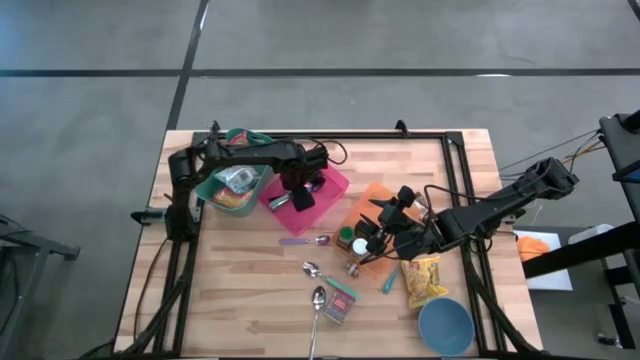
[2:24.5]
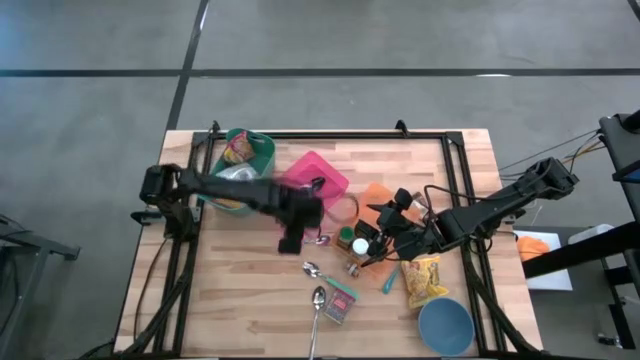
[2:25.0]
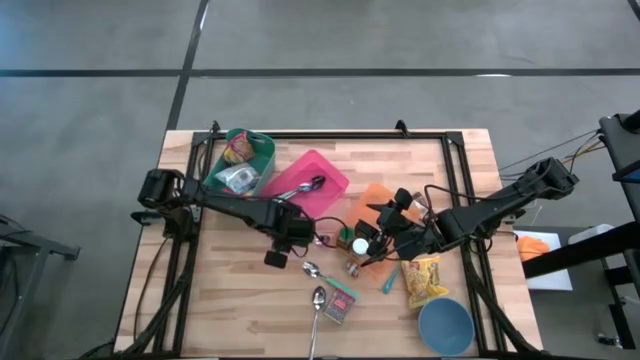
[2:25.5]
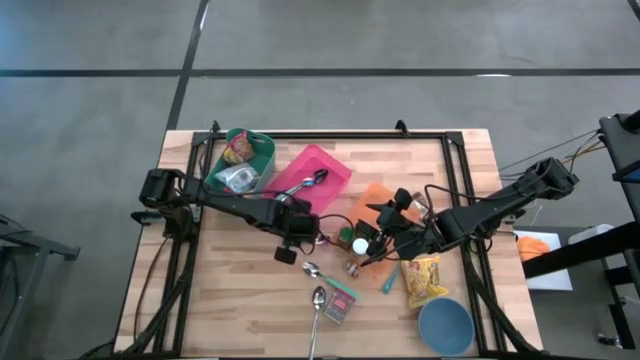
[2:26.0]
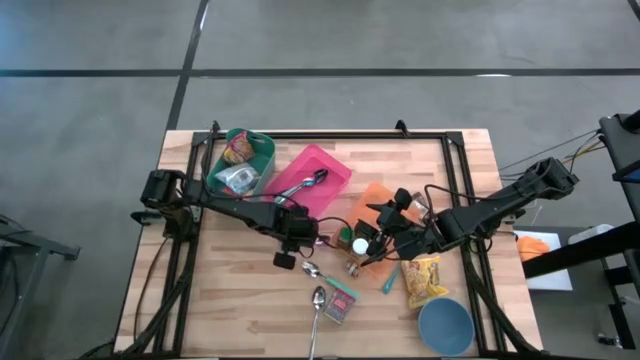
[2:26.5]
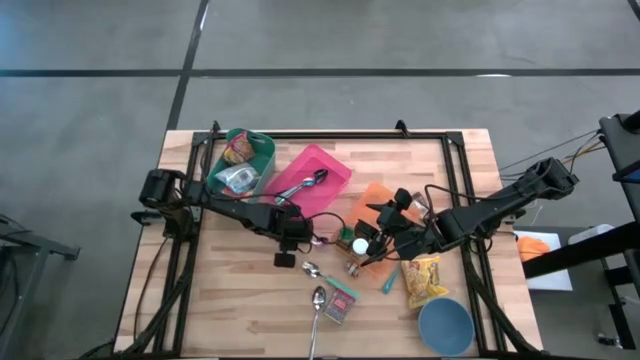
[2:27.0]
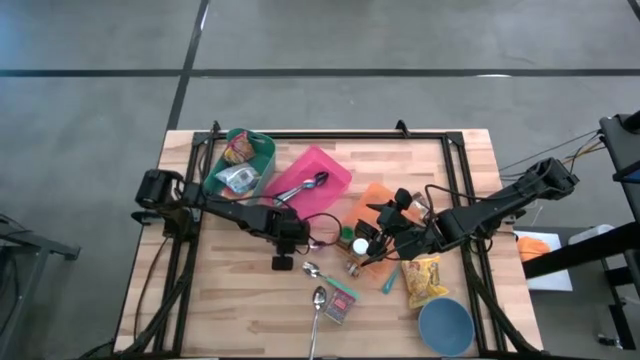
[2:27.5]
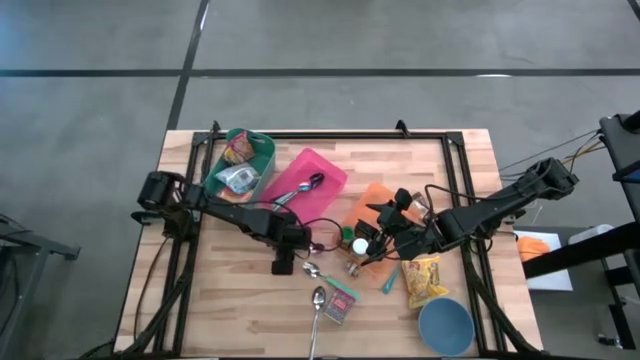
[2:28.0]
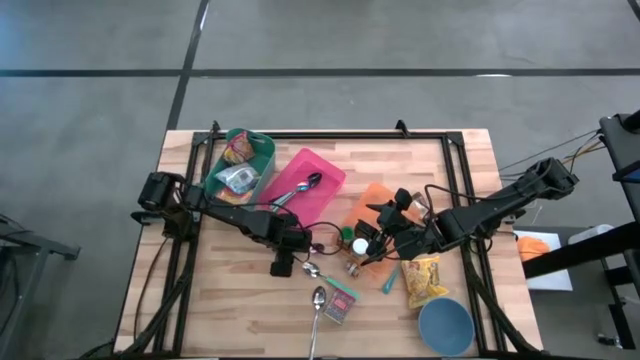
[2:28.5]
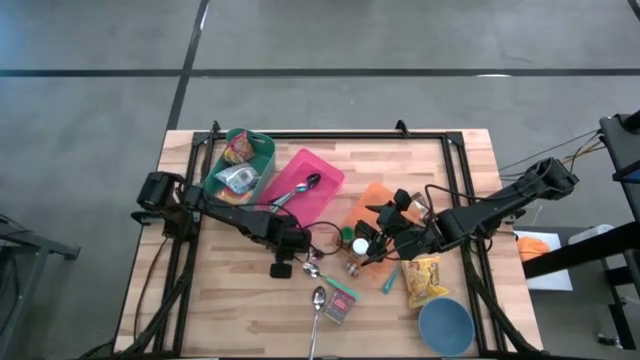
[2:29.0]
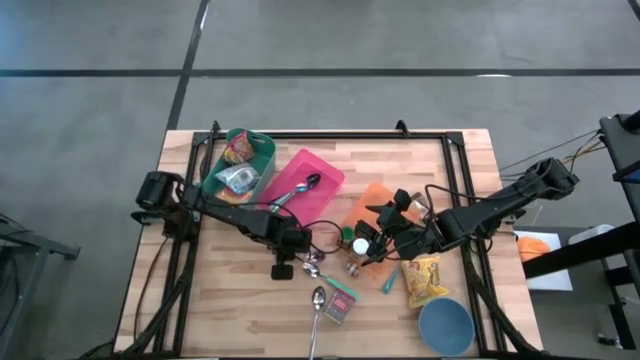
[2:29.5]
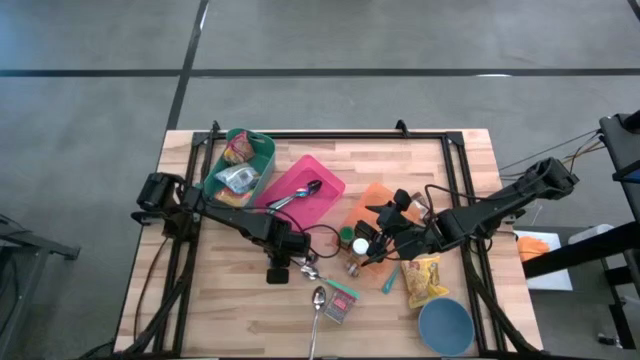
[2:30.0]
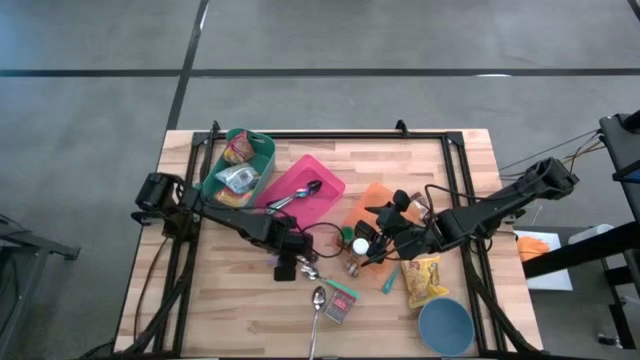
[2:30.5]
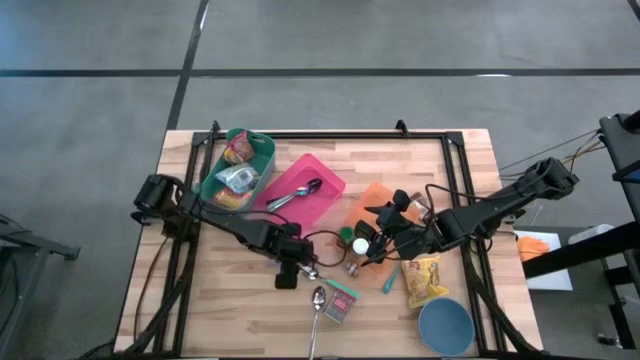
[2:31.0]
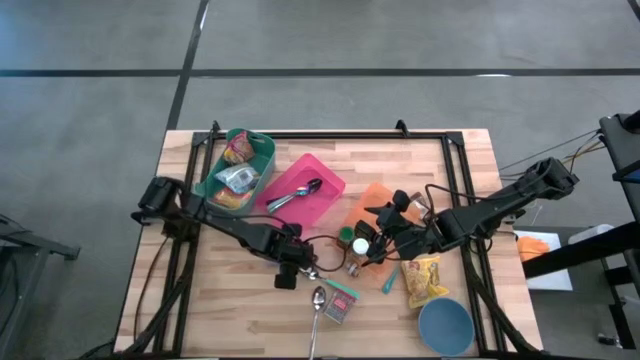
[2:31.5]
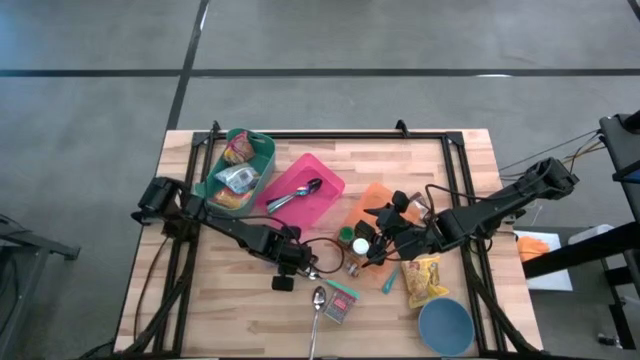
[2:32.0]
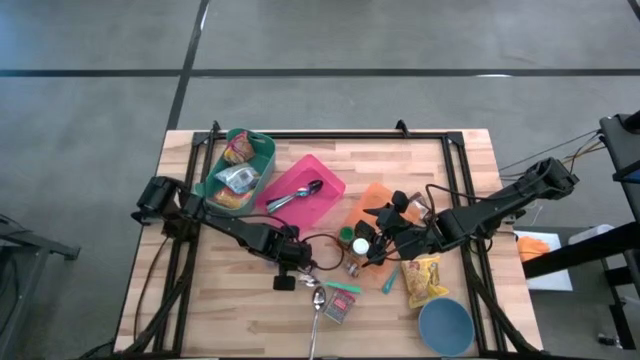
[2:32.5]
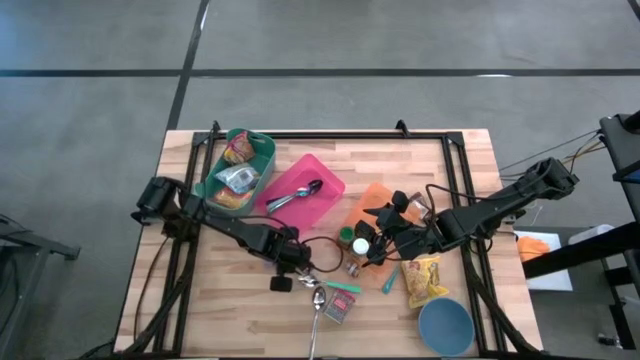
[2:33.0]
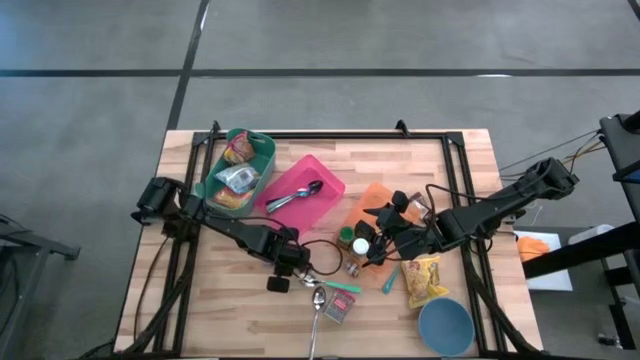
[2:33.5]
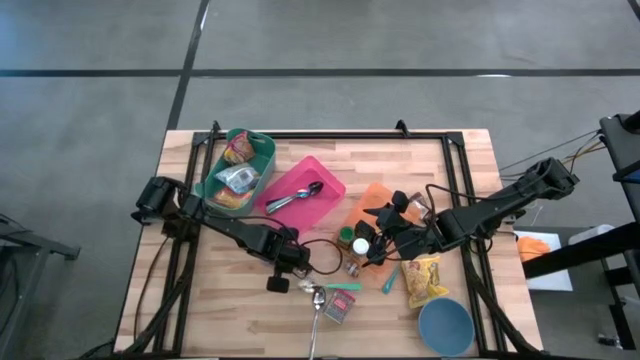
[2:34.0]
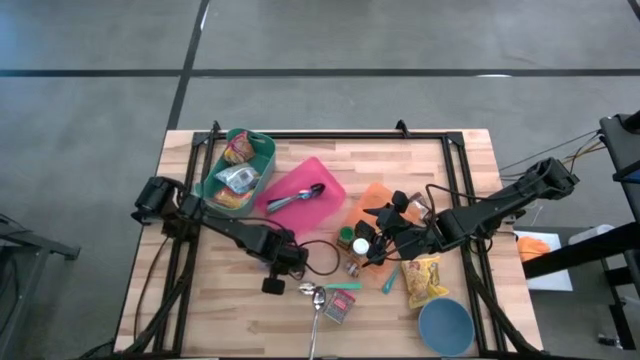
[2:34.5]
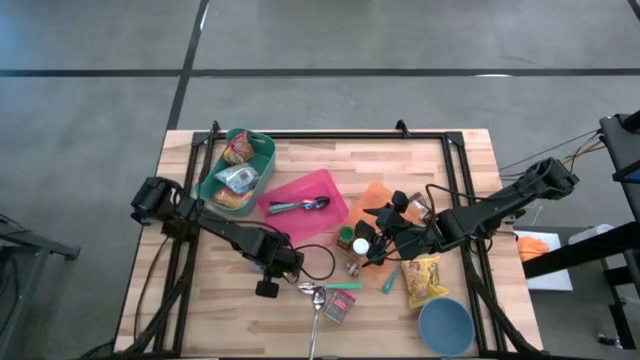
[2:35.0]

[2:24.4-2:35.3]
Put the violet spoon into the pink bin

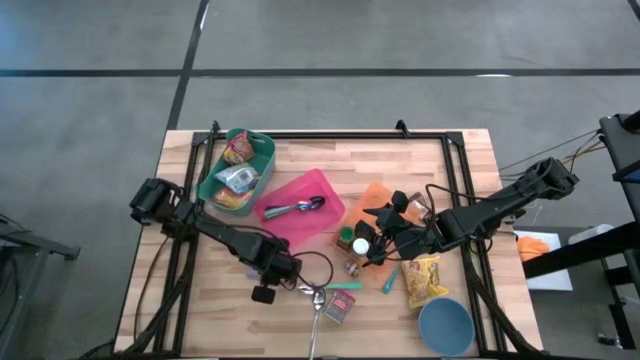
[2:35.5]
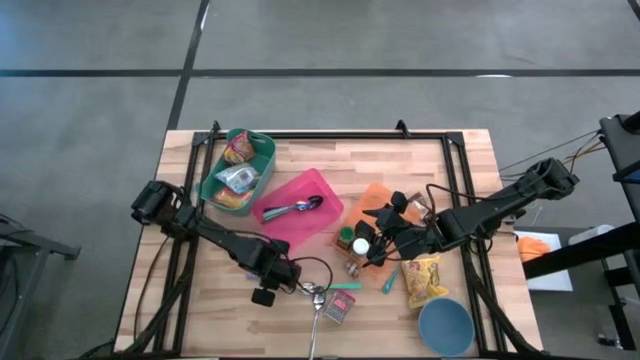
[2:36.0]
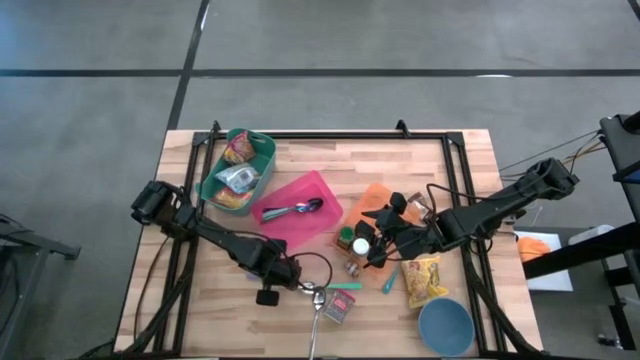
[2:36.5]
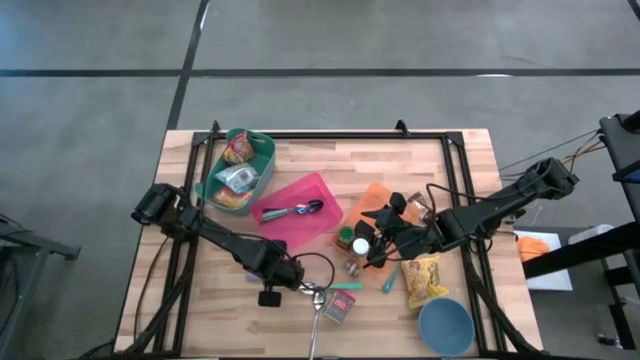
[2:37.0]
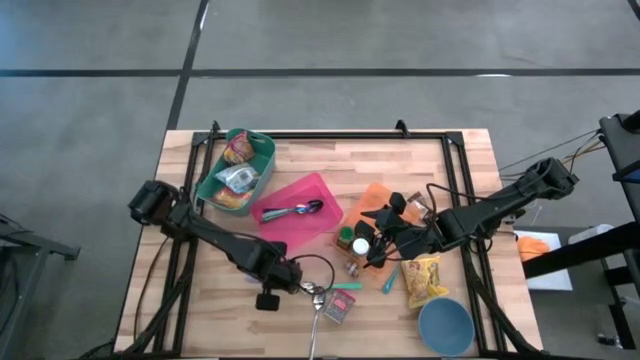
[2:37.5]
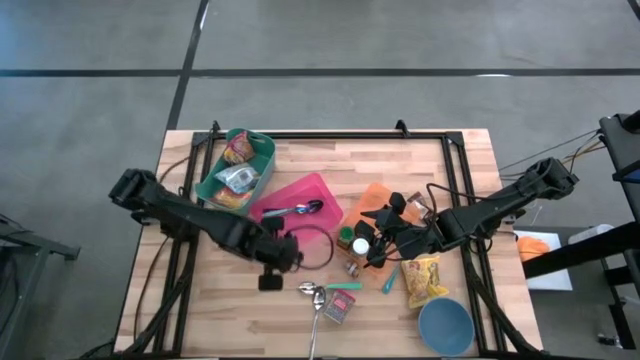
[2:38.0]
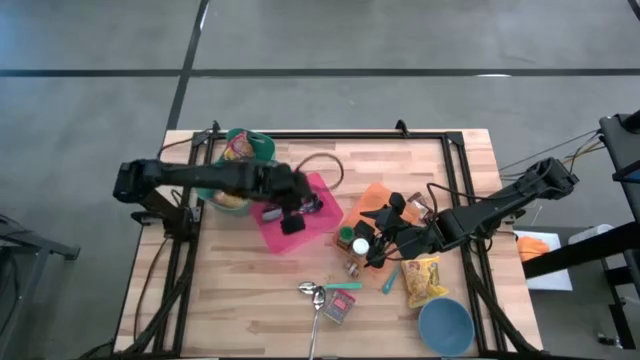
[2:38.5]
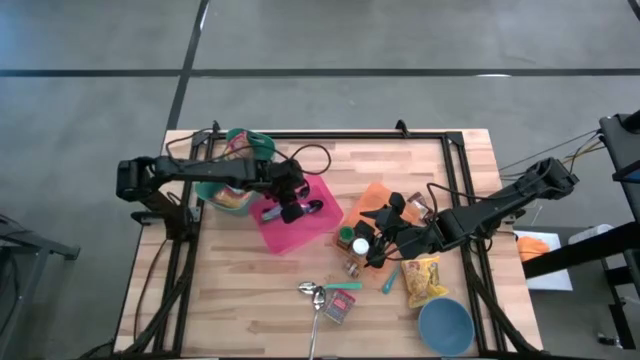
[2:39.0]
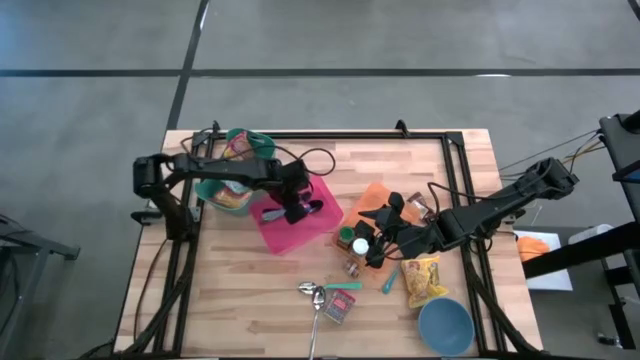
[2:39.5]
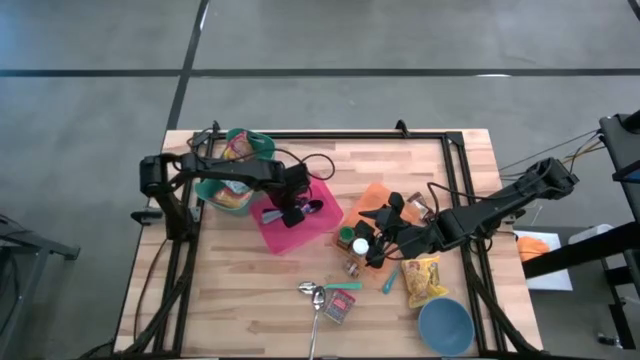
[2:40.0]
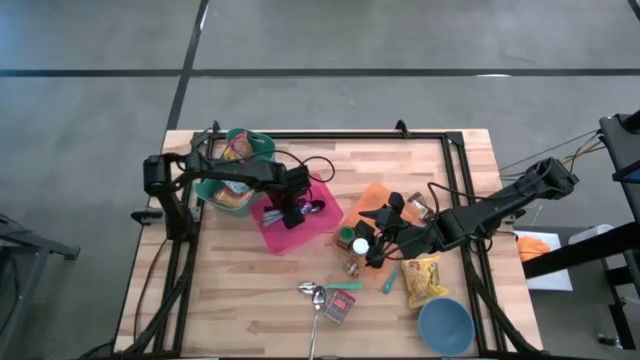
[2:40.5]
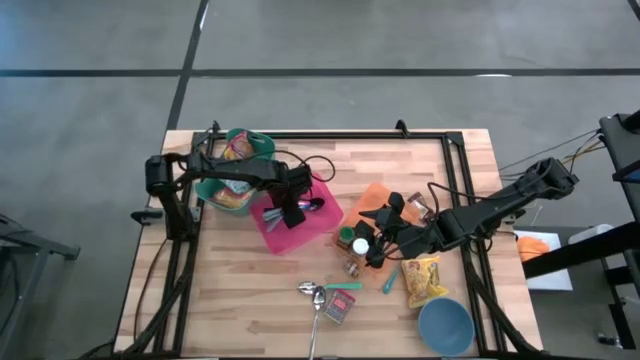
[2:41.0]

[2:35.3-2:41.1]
Put the violet spoon into the pink bin

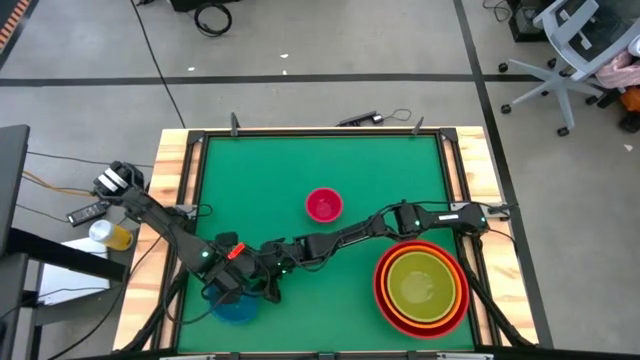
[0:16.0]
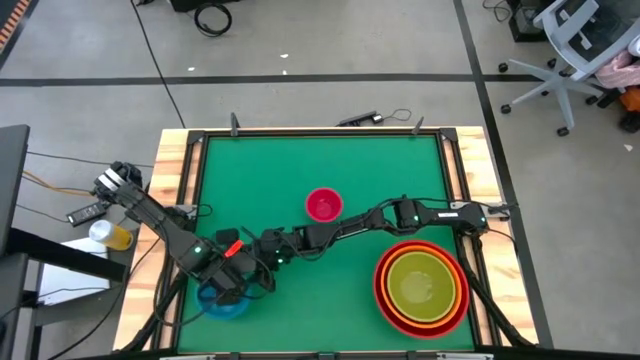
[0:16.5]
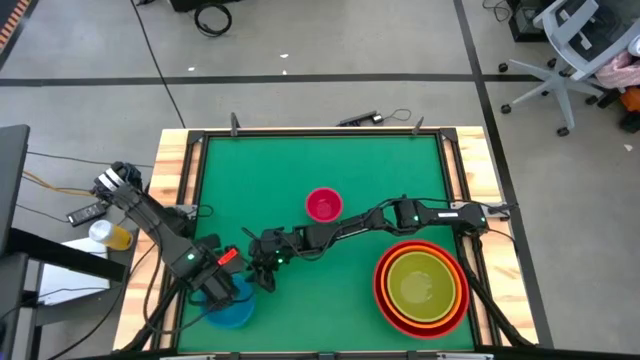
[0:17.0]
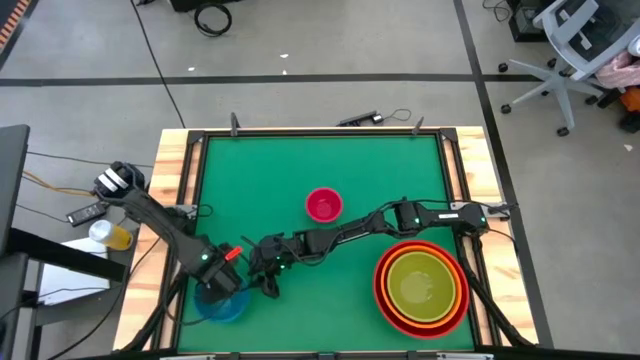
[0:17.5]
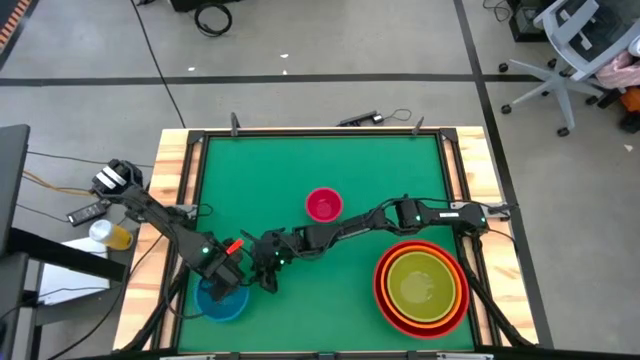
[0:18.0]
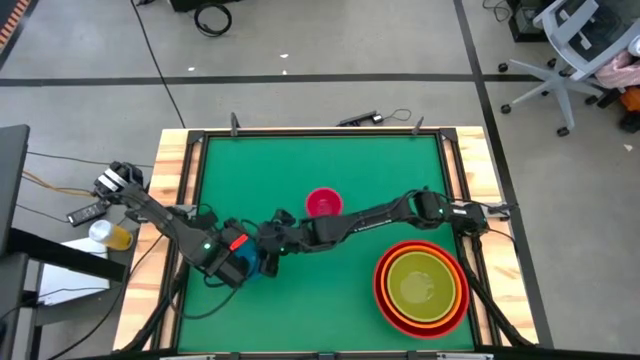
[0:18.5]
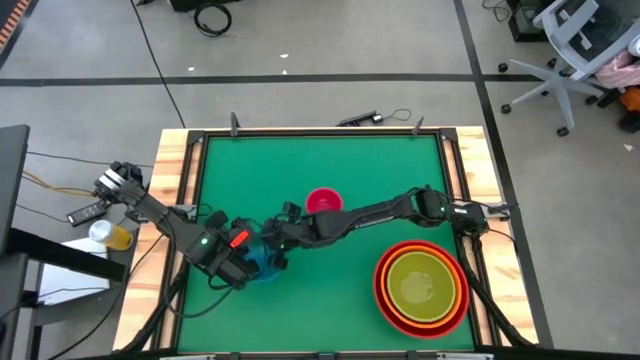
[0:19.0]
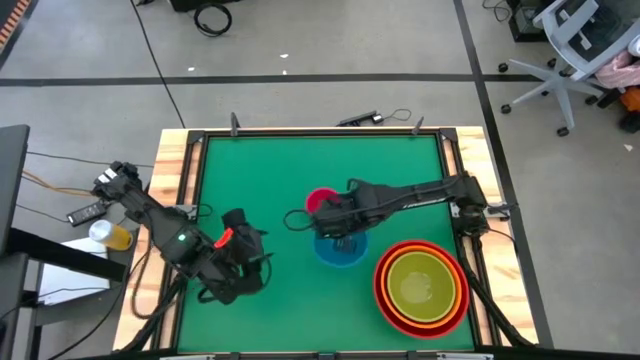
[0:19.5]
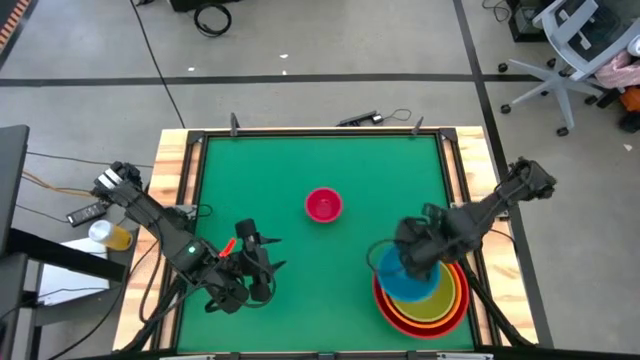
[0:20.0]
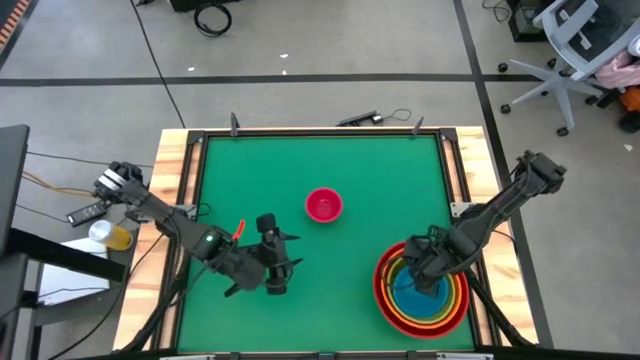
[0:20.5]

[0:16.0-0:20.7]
Stack the blue bowl on top of the green bowl
